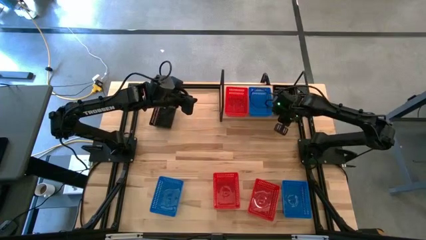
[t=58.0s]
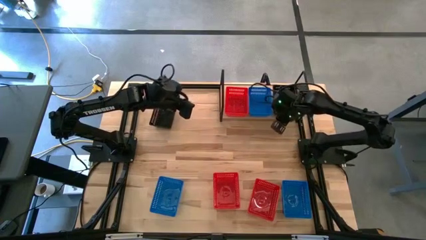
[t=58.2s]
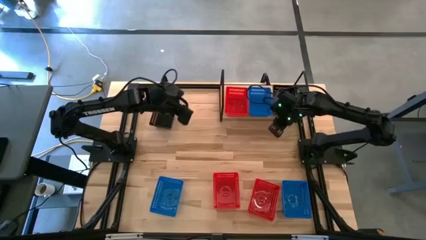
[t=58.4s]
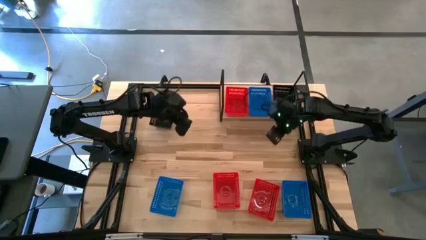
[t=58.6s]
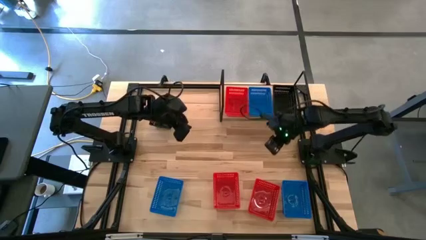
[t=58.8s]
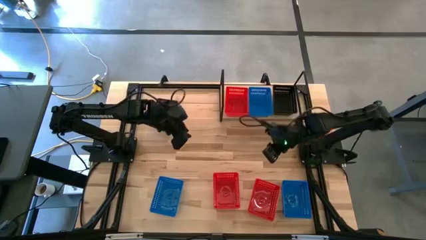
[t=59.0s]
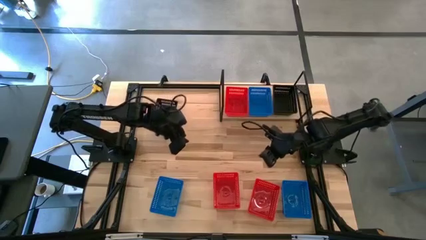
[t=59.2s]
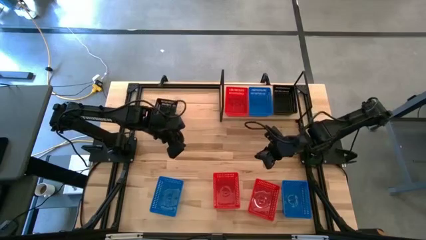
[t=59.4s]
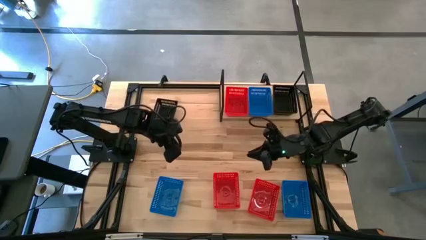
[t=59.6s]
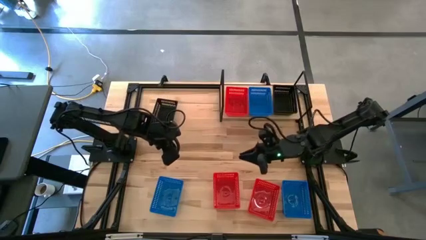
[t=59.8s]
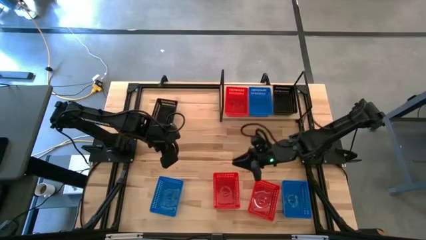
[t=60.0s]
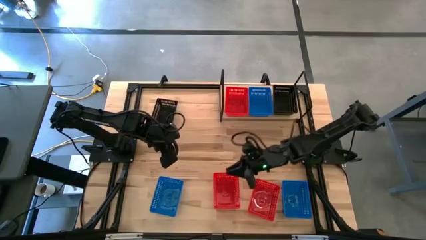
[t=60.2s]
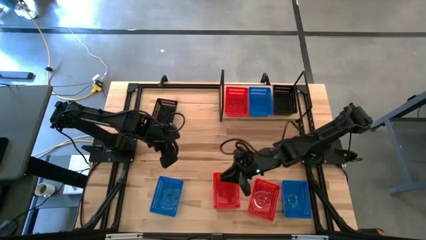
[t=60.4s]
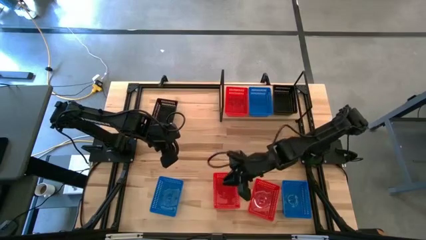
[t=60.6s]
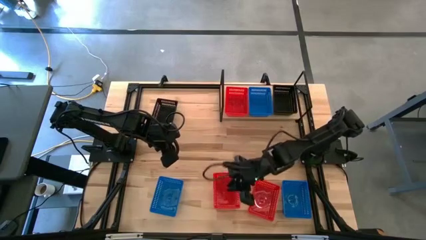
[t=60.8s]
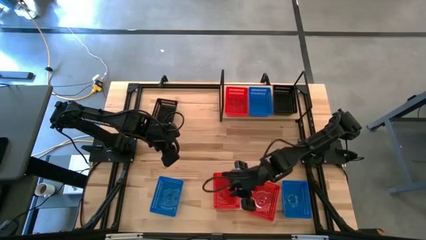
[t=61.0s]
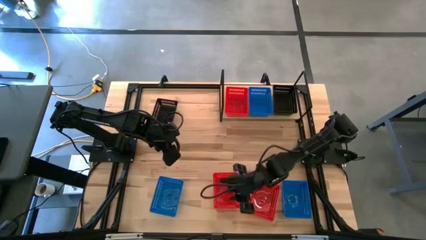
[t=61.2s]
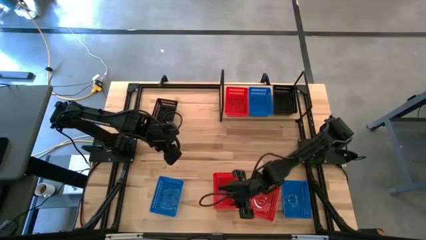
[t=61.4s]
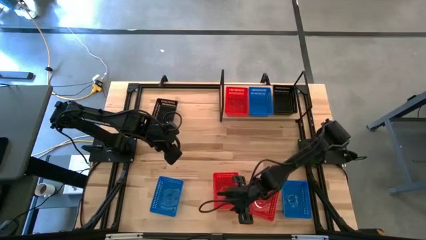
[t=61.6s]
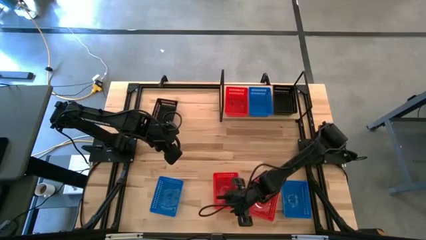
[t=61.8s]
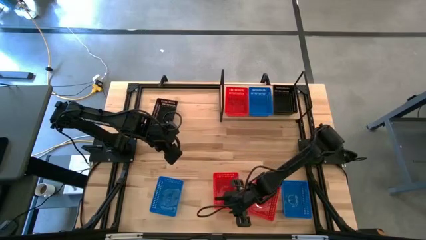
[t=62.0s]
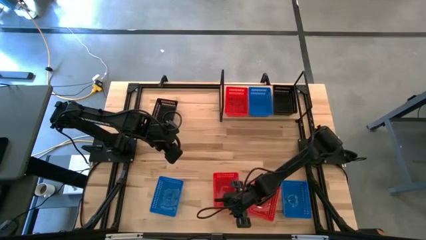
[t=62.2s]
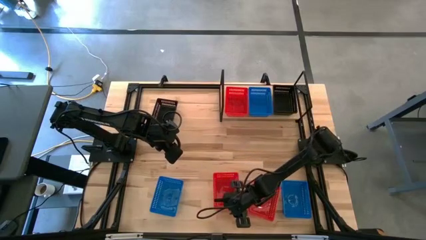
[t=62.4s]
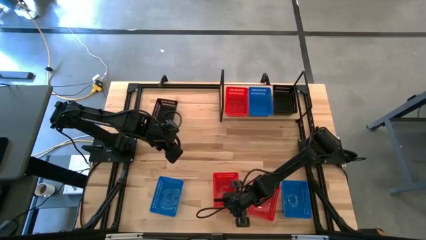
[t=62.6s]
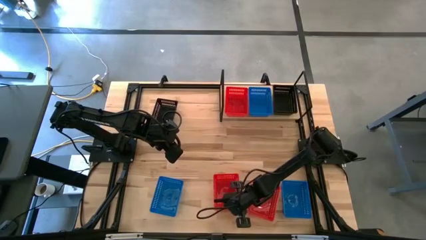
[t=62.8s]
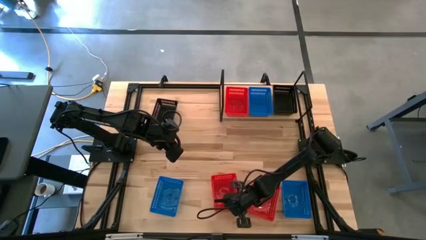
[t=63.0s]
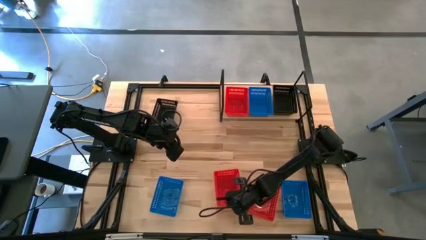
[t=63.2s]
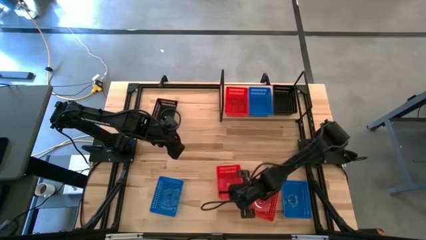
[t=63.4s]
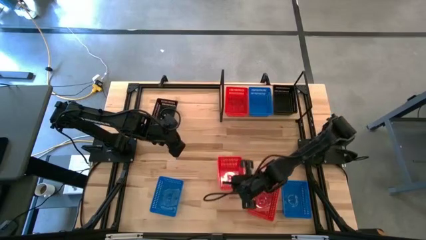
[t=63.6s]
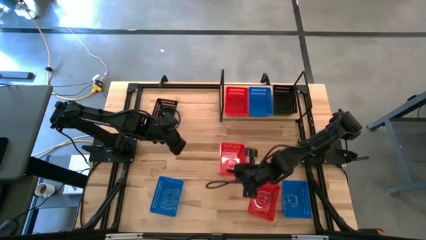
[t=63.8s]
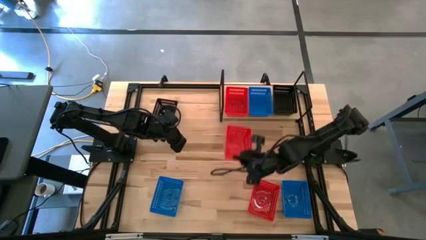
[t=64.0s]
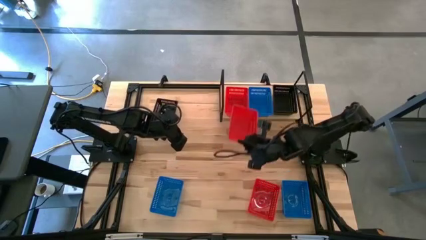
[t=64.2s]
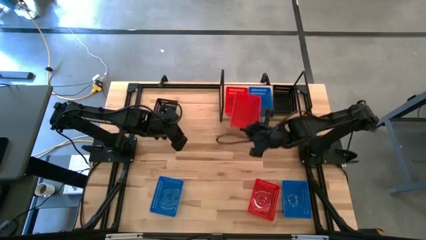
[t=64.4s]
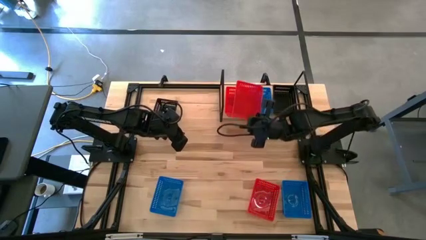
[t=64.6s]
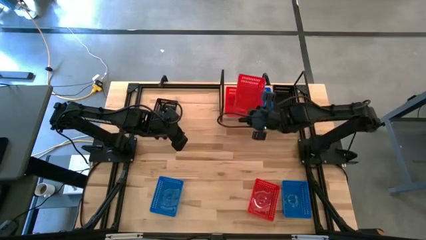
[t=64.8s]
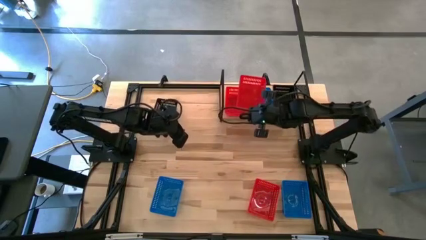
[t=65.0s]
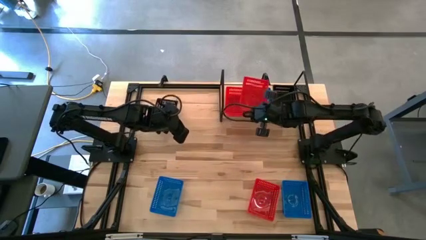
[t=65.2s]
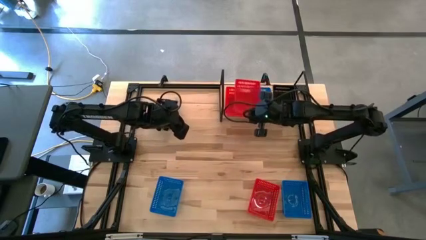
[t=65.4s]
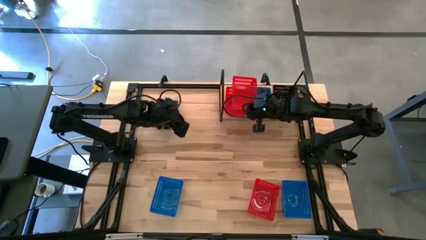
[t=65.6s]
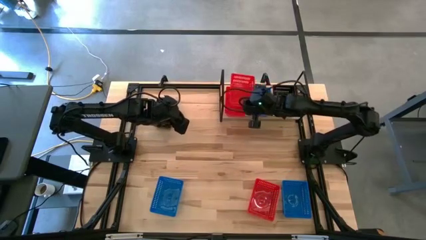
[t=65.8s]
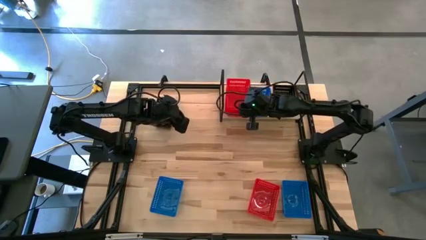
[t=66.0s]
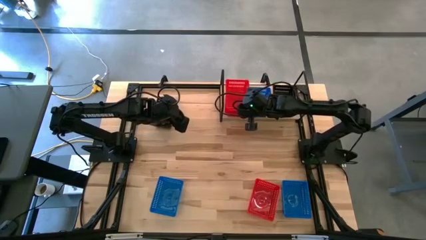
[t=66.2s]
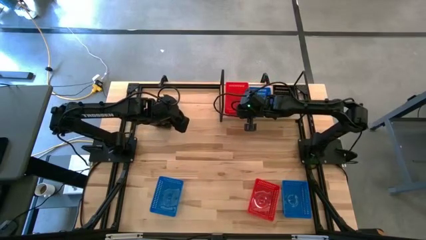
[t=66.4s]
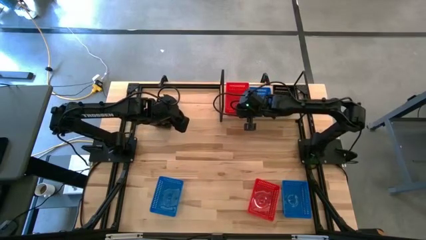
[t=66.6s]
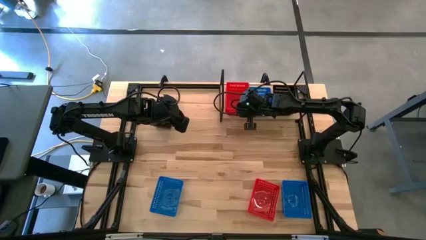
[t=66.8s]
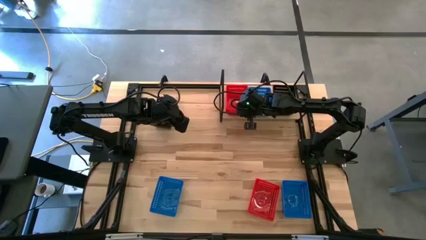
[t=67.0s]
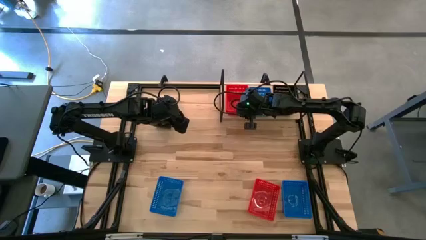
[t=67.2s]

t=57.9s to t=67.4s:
Task: Stack baskets on shelf by color
Stack the left red bin on the top red bin on the shelf
